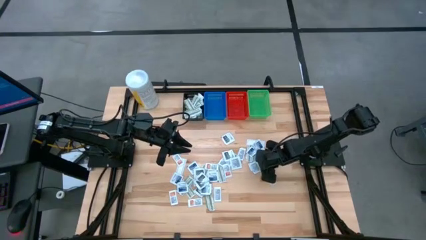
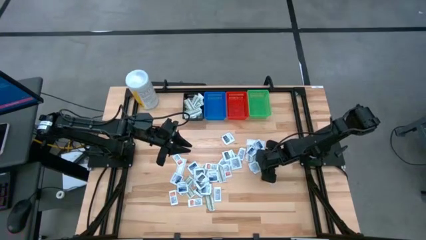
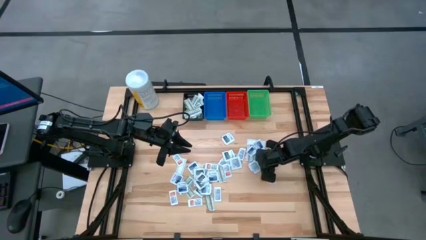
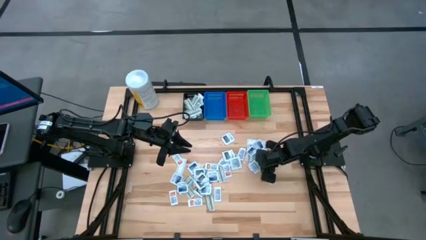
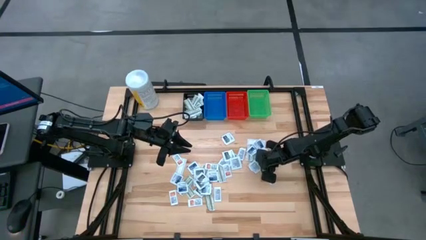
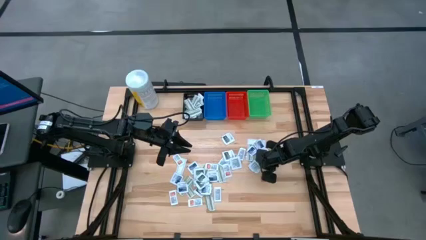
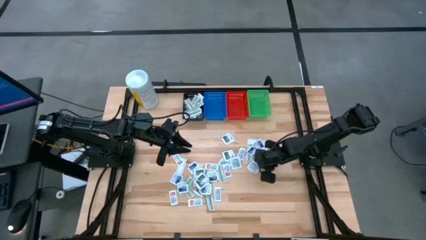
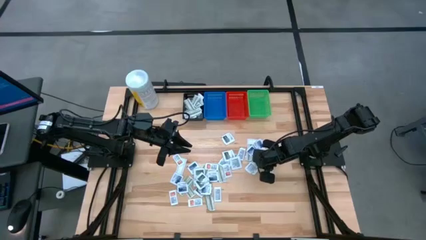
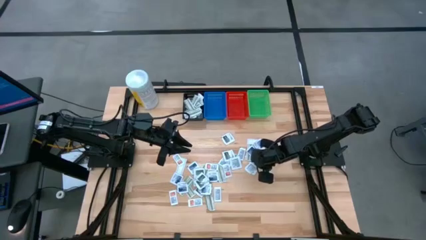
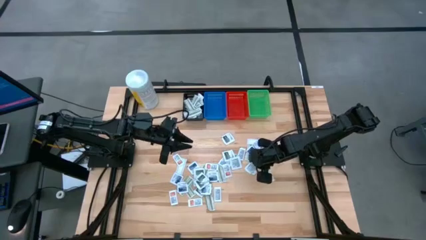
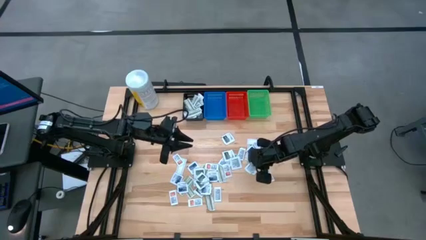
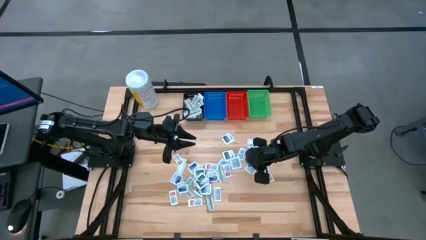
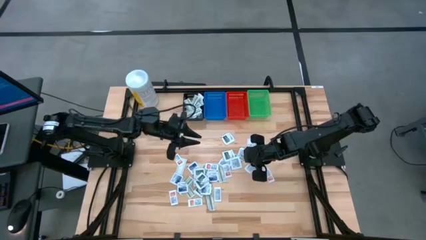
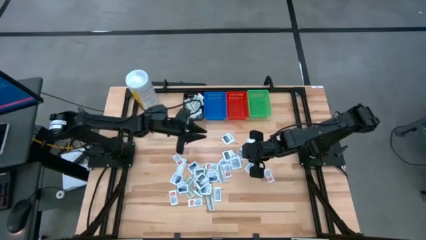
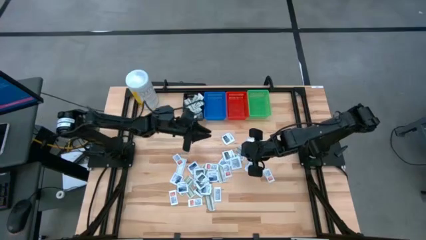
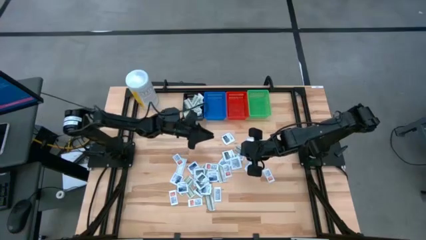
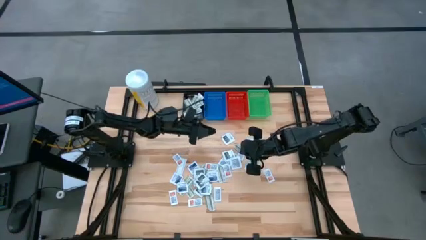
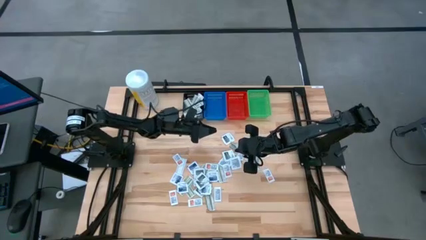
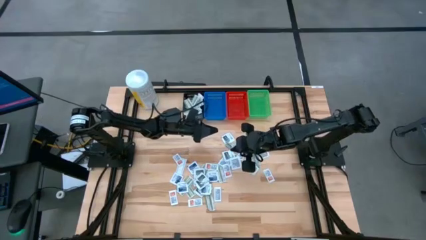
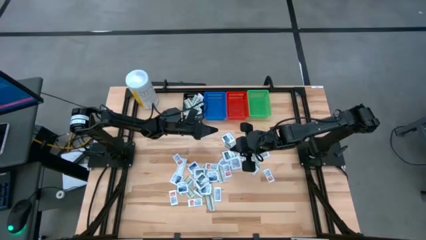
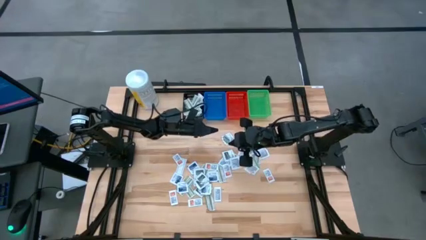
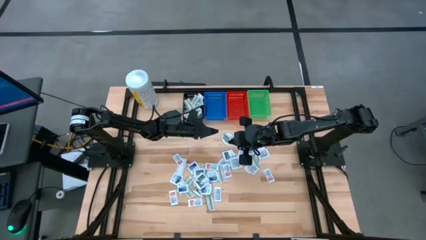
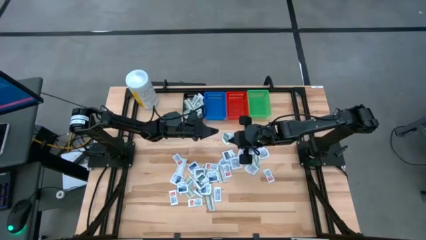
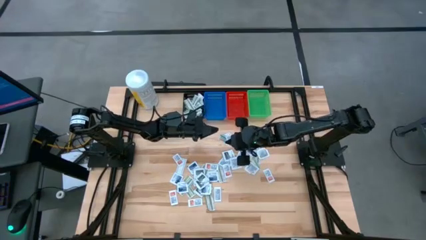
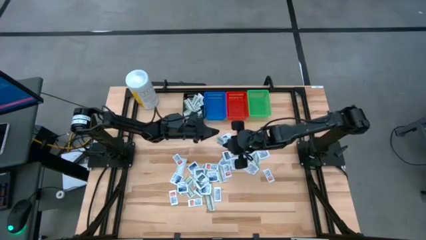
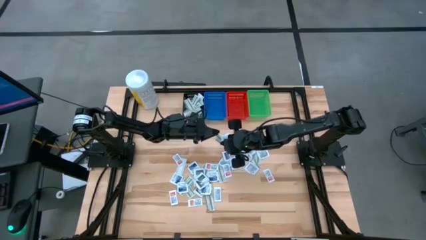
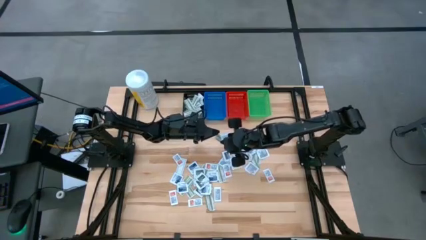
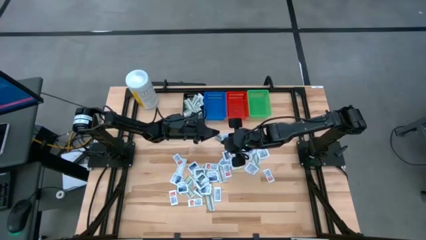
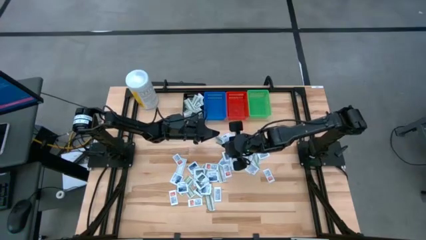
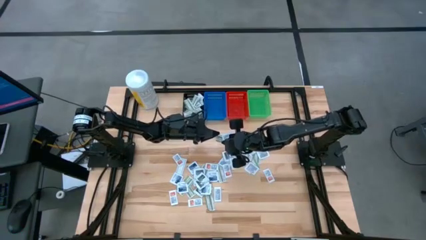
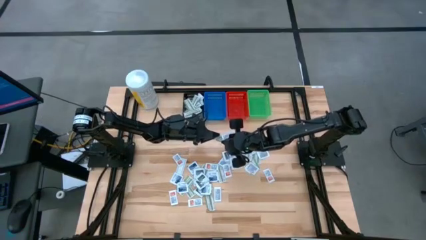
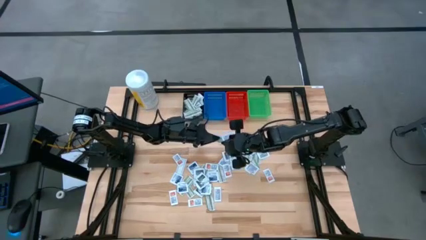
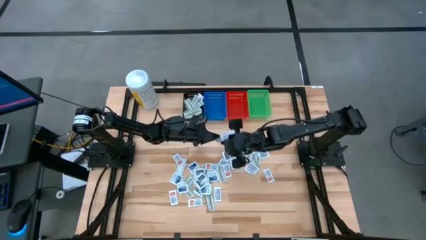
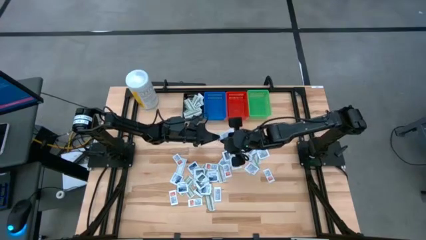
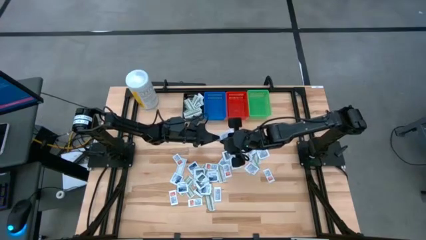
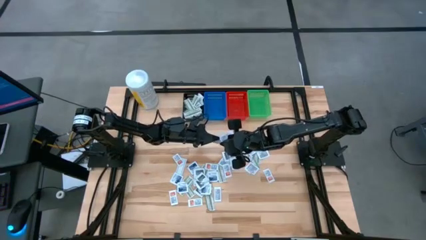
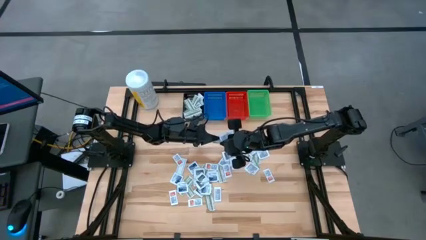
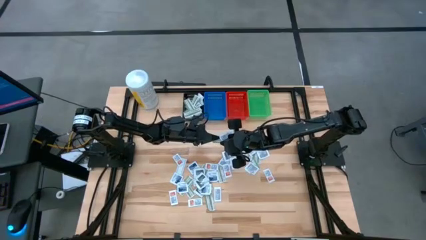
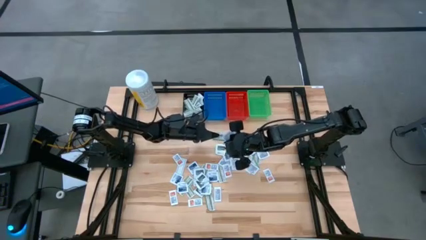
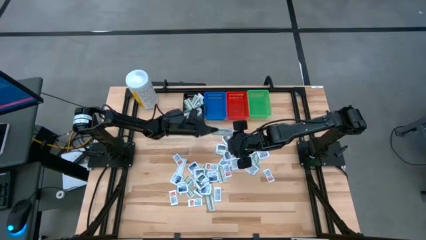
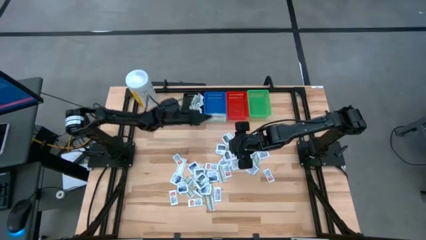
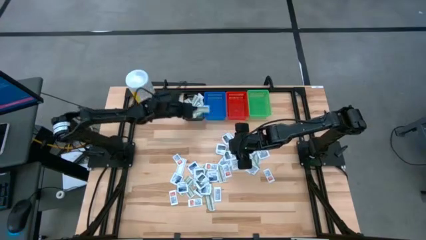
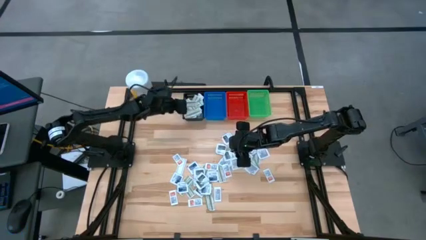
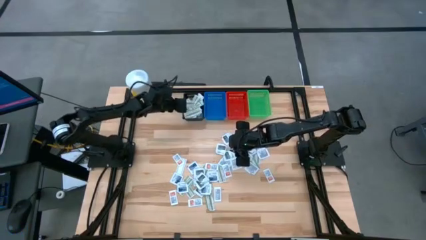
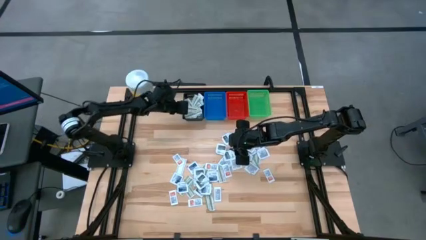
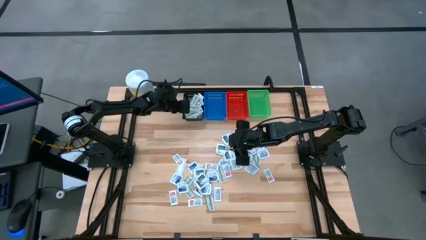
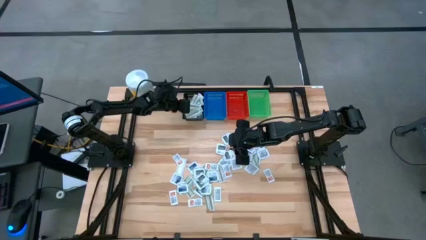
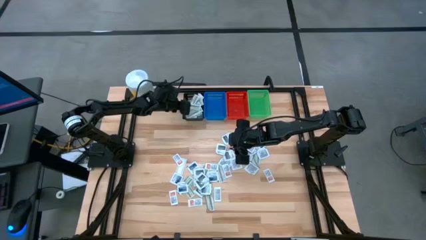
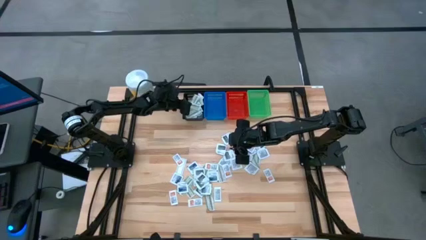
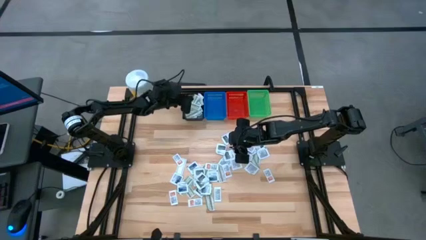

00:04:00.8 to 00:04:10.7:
Task: Pick & Place First Aid Supplies
Put the green bandage pack in the black bin

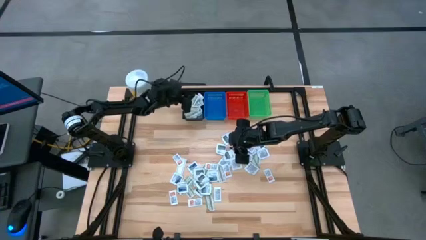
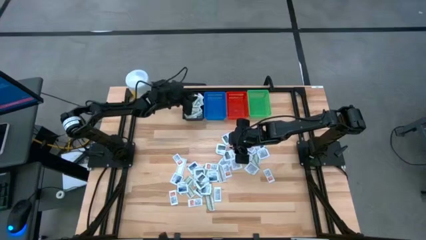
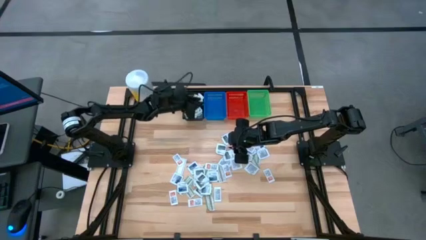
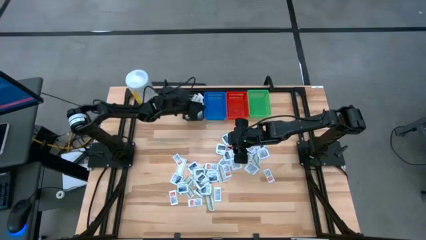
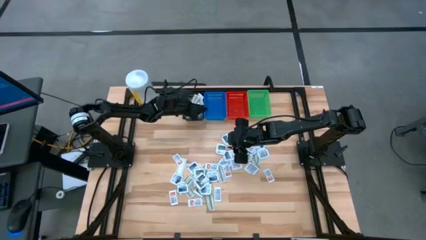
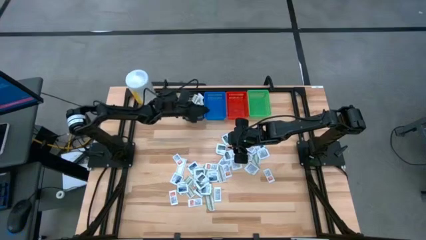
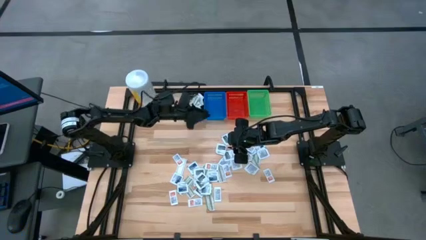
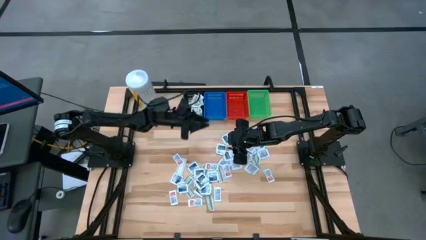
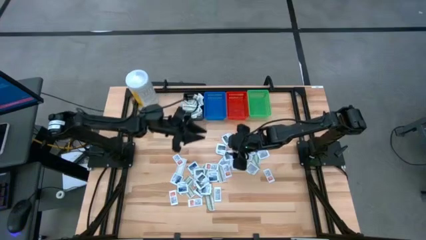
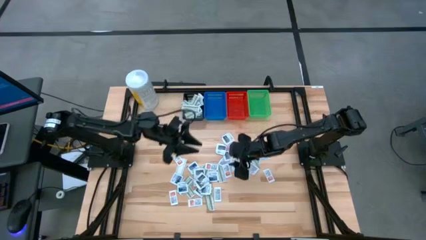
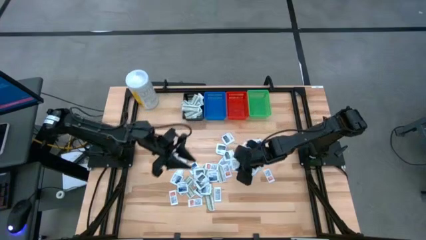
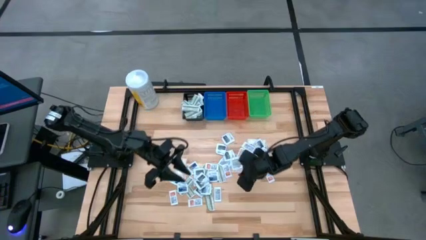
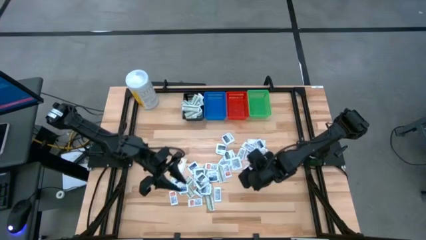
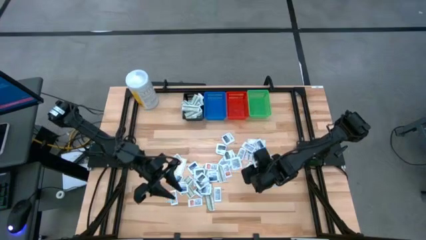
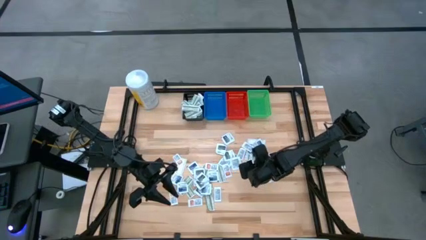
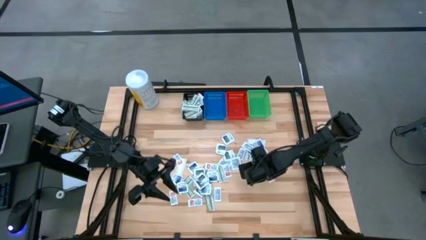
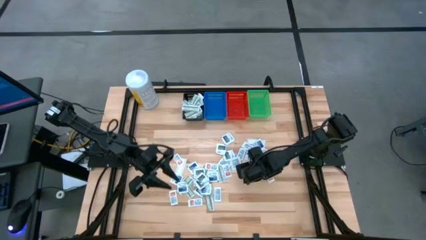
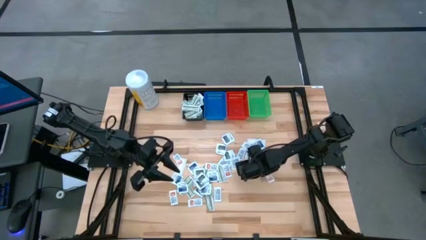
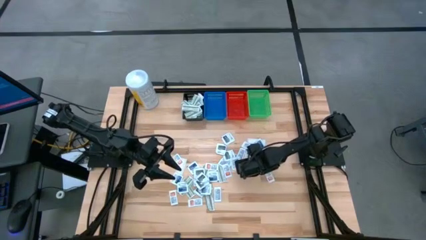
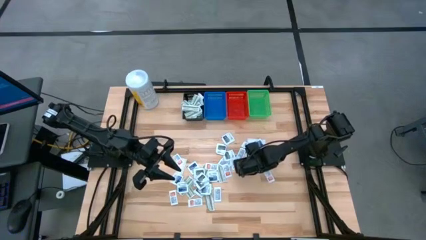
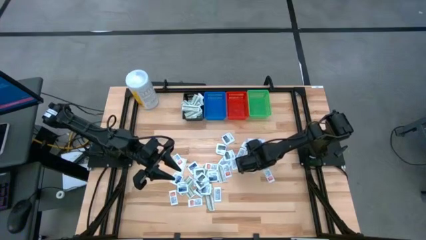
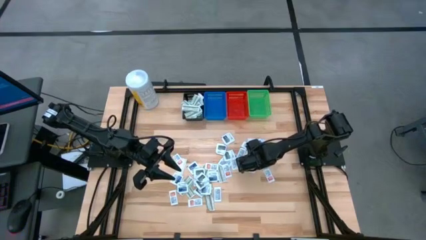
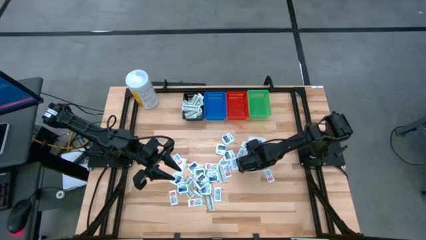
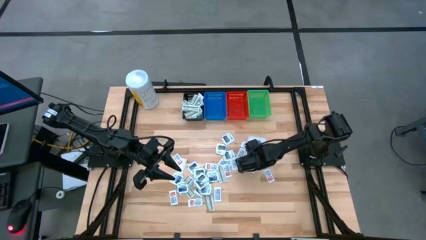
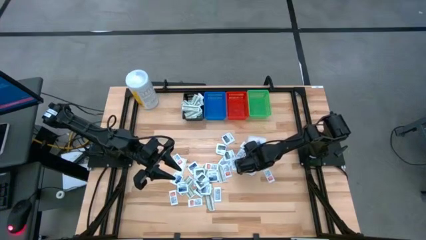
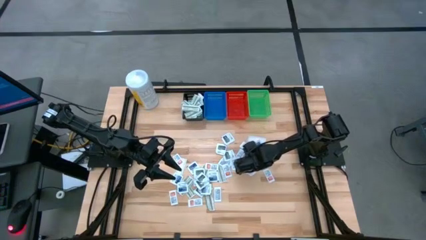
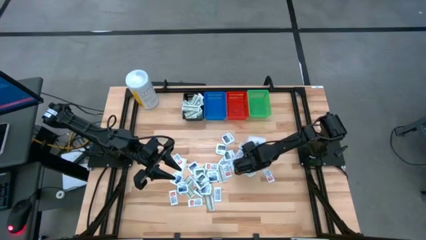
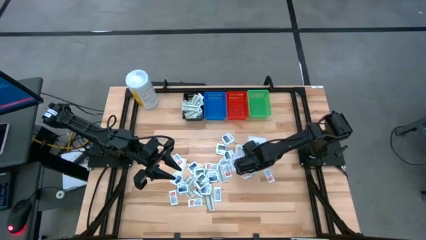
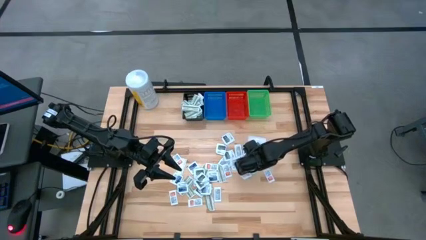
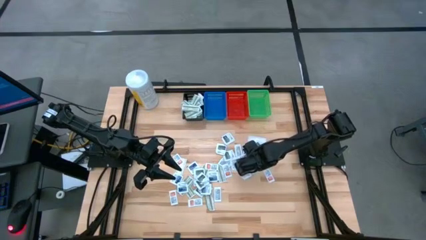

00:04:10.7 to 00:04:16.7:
Put the green bandage pack in the black bin
